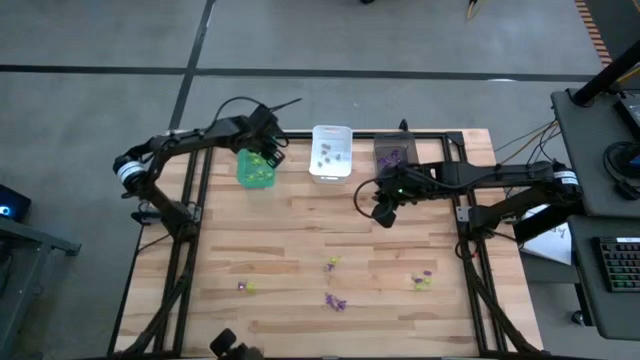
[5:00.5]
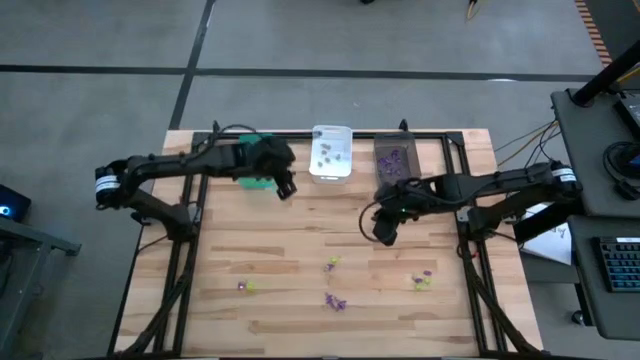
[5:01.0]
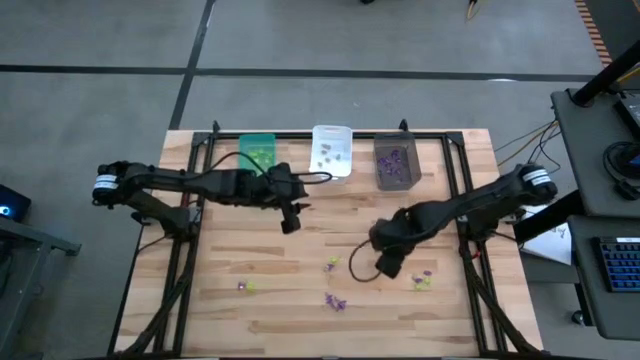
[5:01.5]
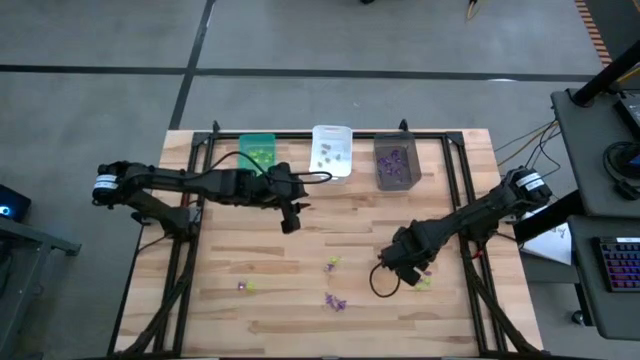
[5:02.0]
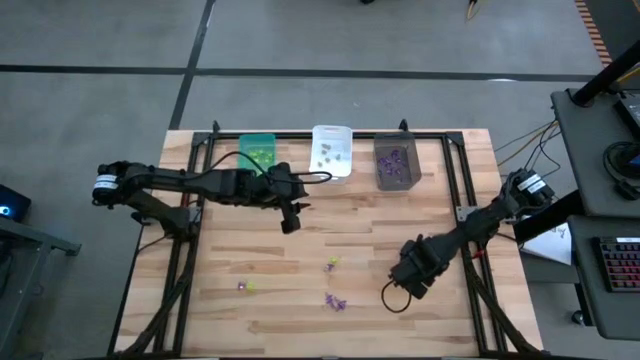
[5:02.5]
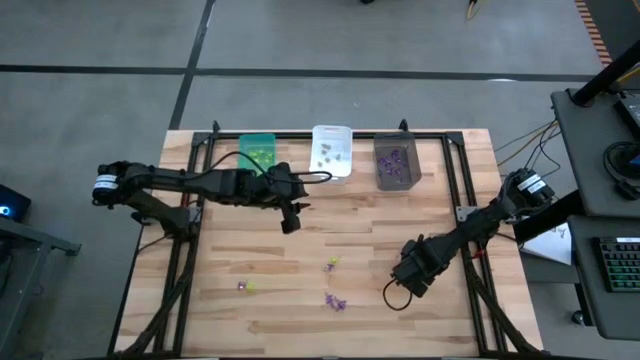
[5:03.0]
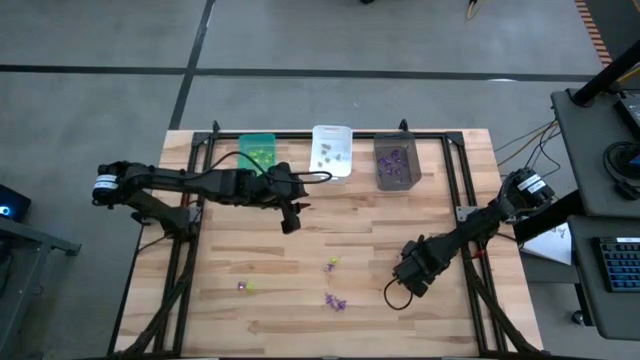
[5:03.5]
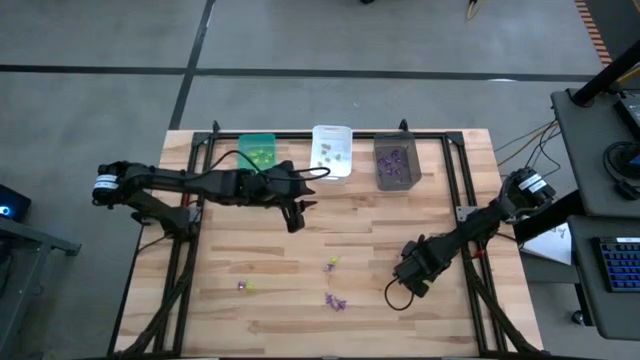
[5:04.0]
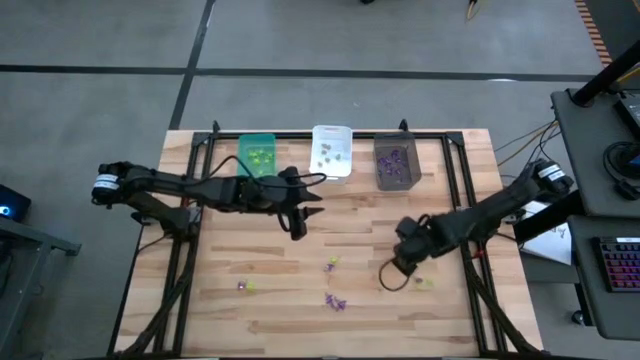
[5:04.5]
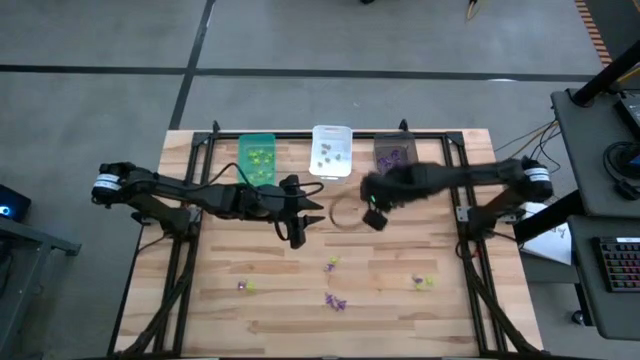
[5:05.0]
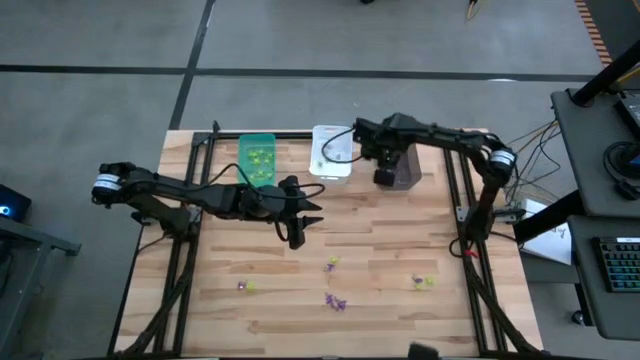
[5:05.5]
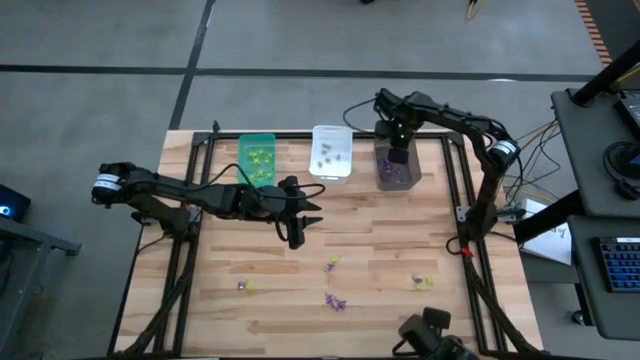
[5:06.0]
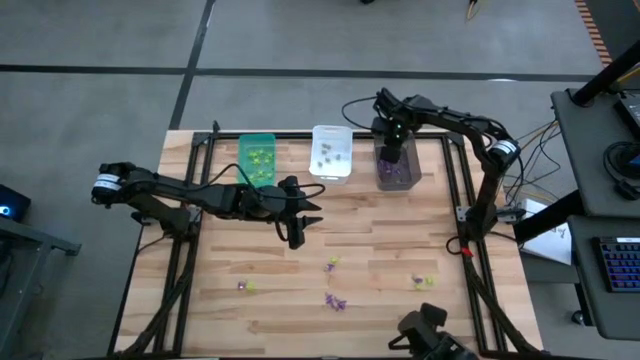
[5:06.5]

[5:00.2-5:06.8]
Task: Sort Halloween decoration
Put the purple witch hat toy into the gray bin

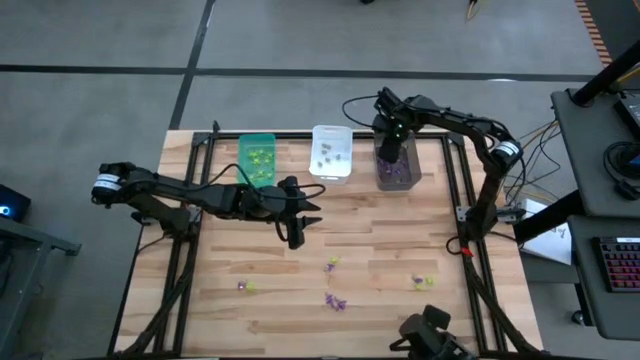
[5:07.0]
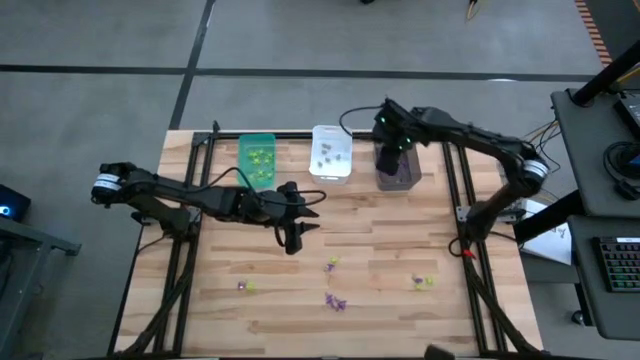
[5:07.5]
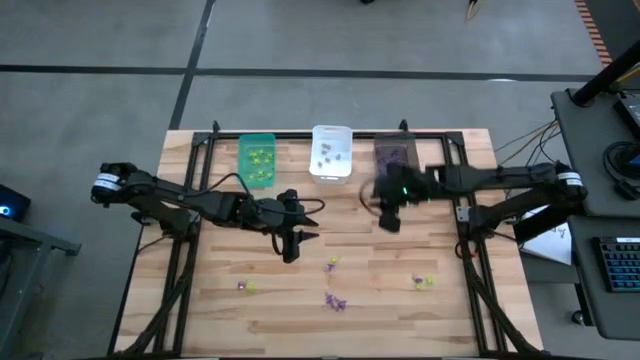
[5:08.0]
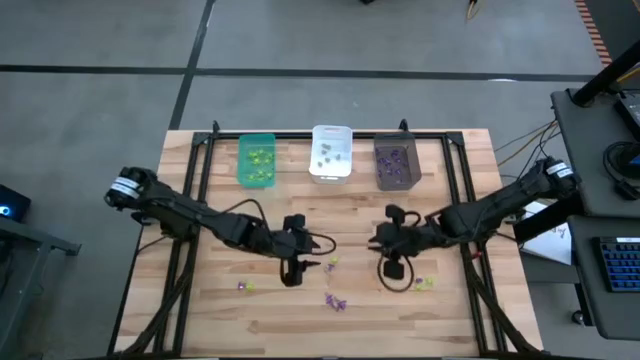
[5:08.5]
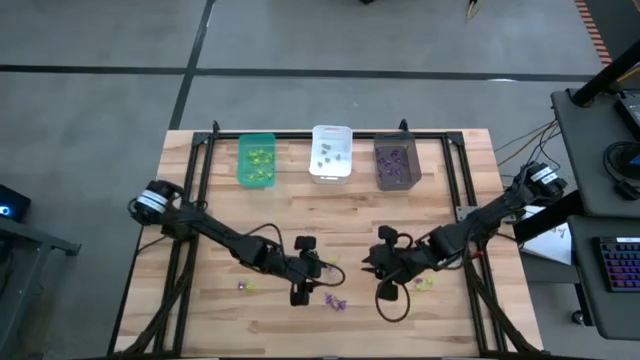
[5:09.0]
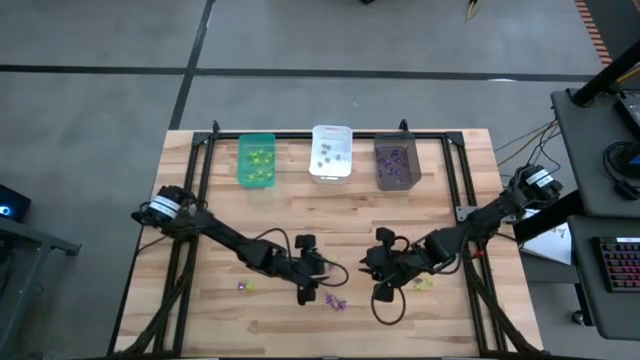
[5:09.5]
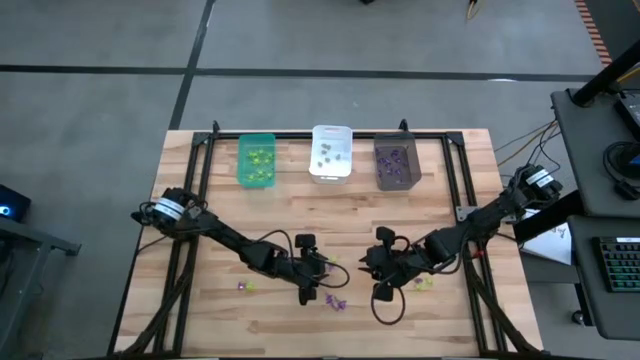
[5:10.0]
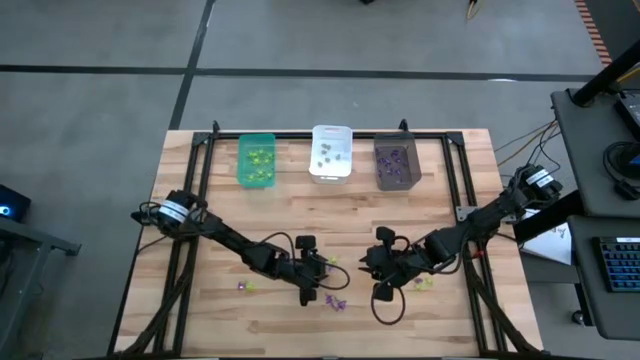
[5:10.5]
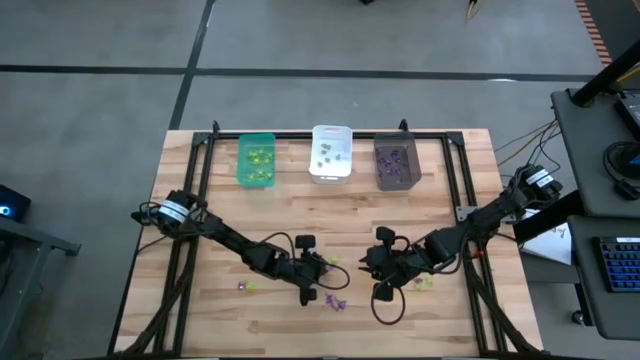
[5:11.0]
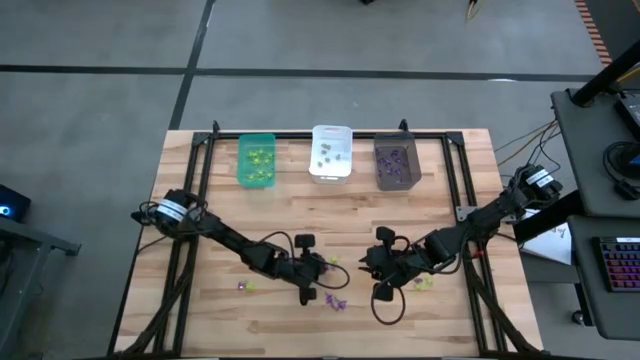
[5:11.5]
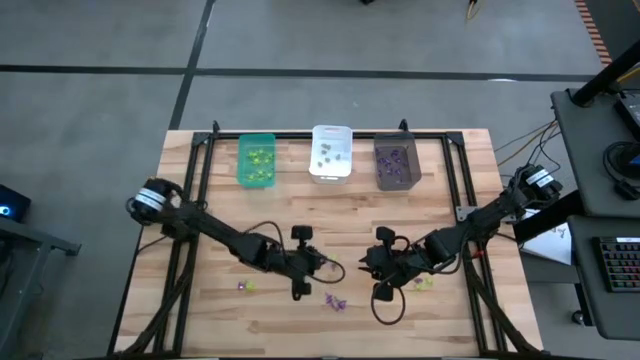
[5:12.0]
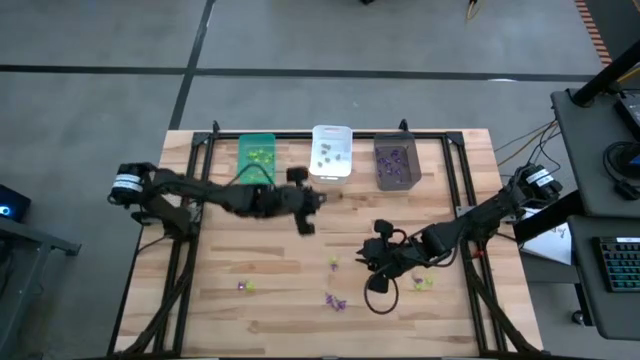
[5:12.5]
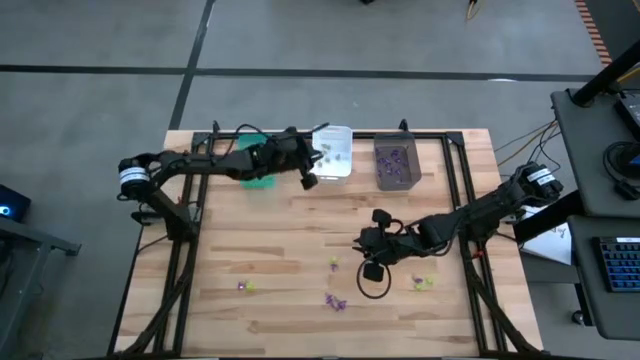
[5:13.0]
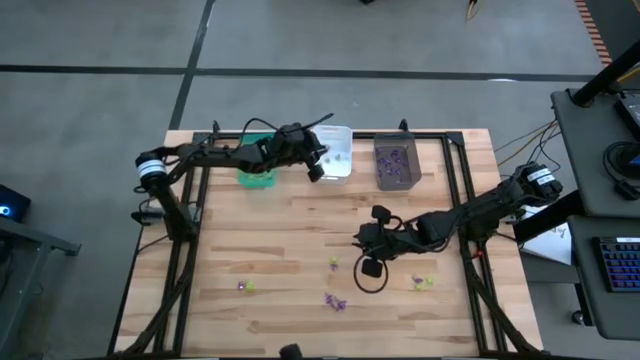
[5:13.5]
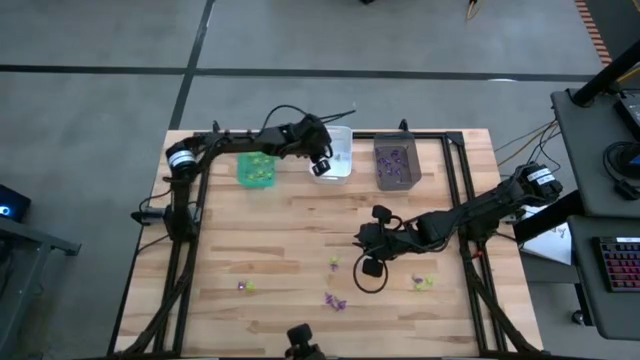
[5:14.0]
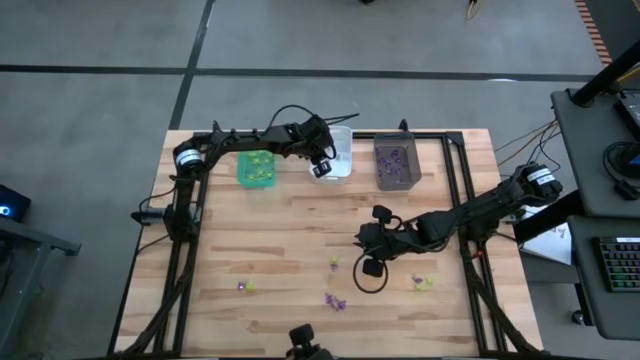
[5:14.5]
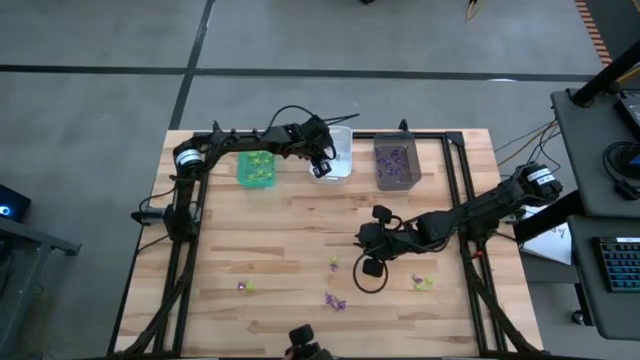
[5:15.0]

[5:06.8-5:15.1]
Put the white skull toy into the white bin

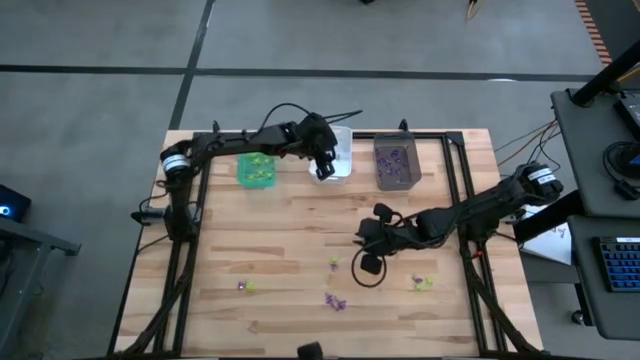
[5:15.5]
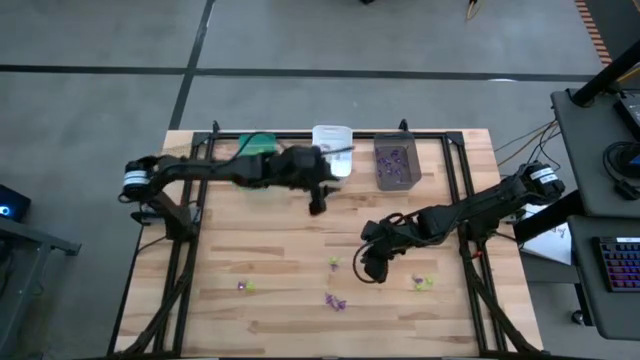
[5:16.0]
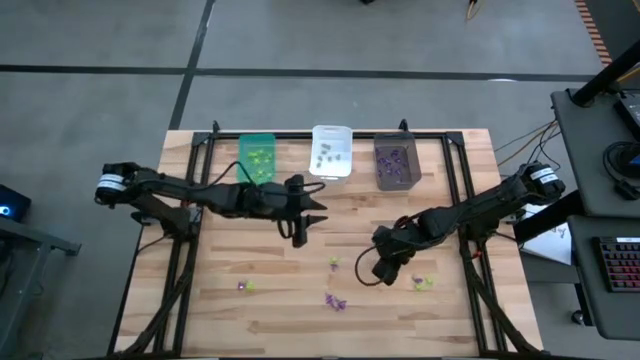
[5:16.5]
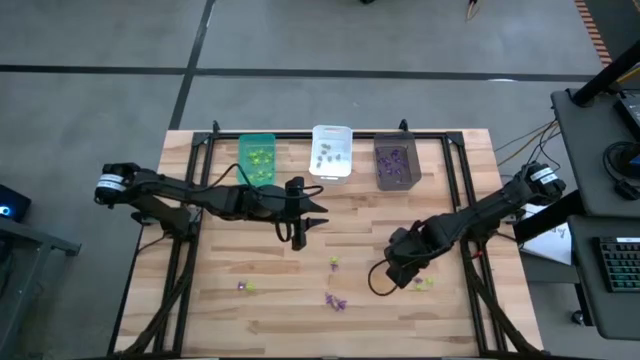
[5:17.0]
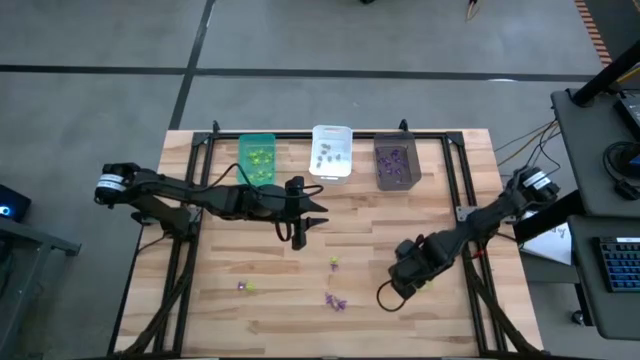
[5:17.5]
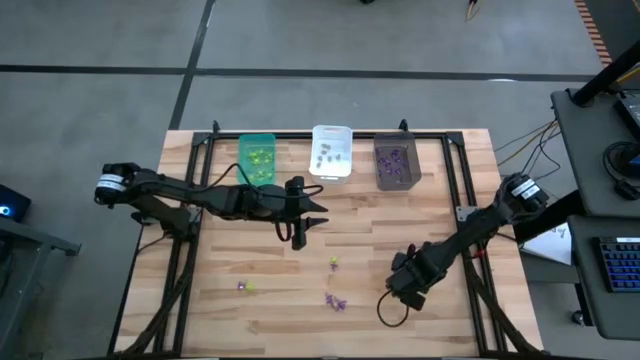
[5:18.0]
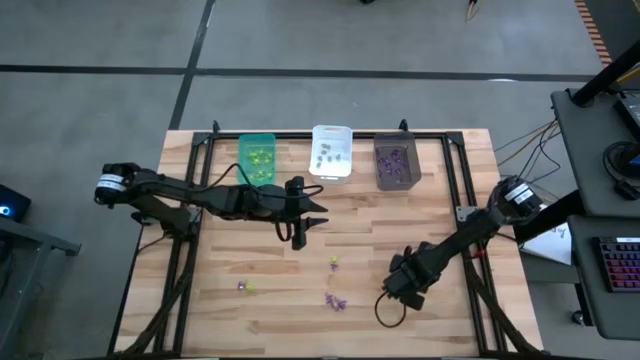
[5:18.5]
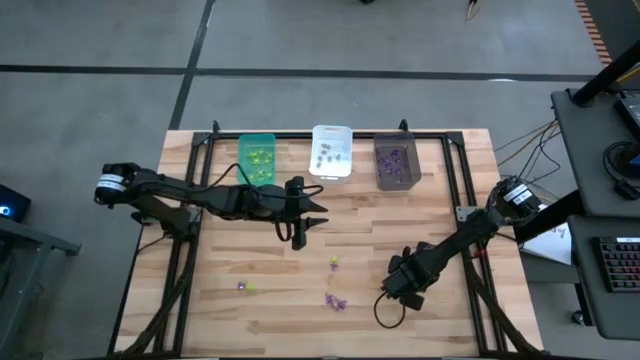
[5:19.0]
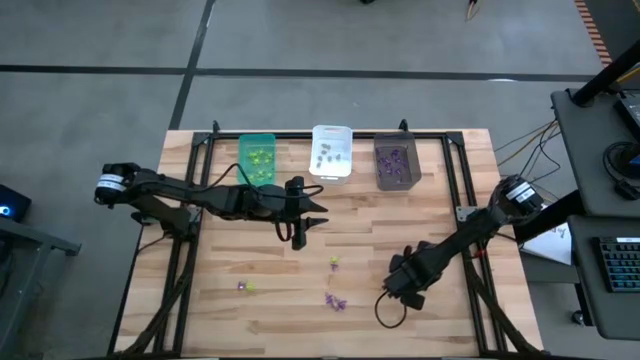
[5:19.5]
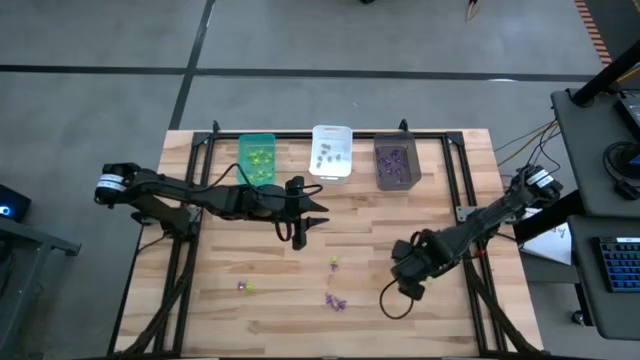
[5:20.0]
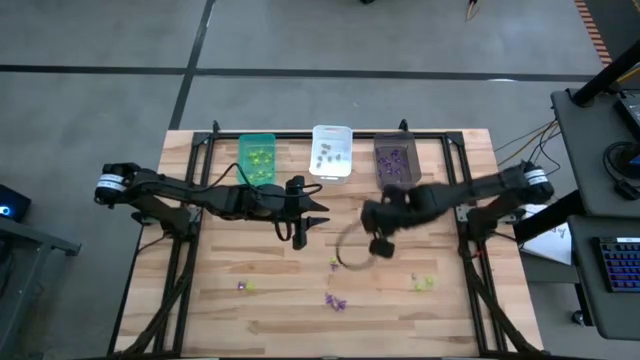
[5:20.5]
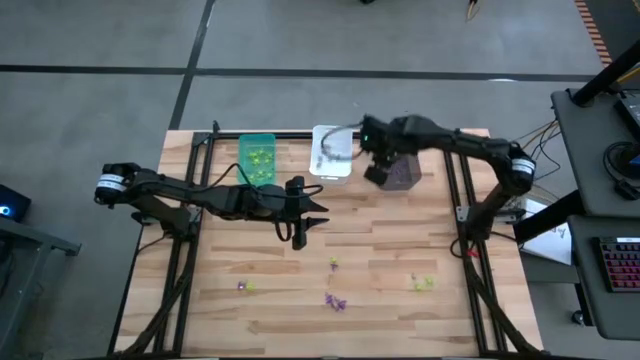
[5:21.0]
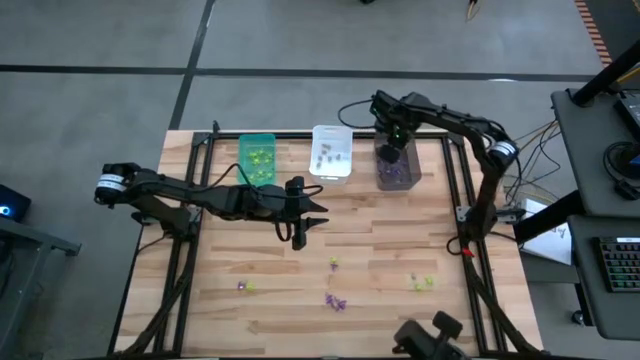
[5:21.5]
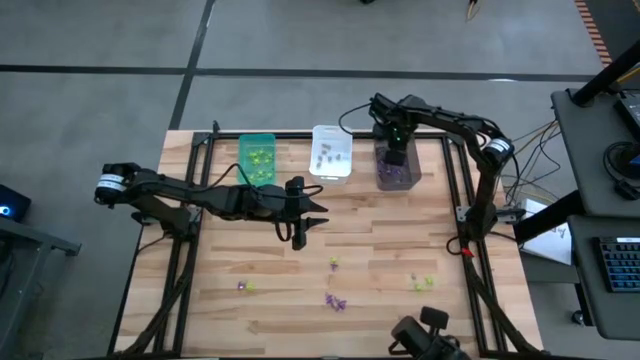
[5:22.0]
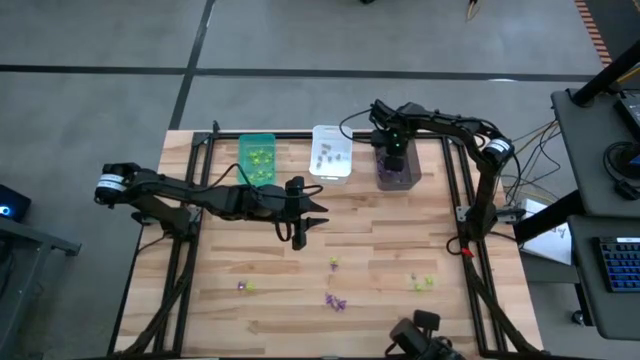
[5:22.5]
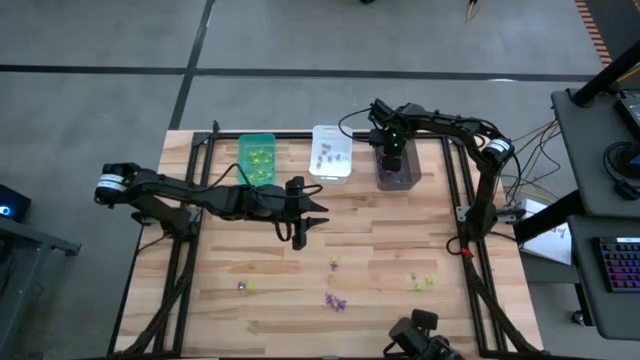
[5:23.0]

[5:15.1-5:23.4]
Put the purple witch hat toy into the gray bin
